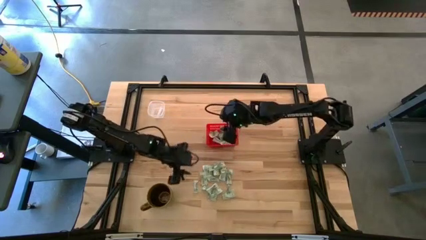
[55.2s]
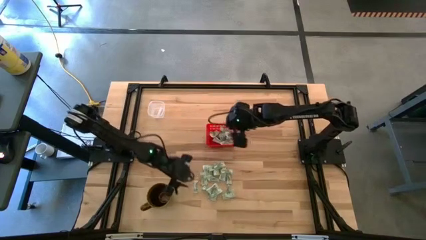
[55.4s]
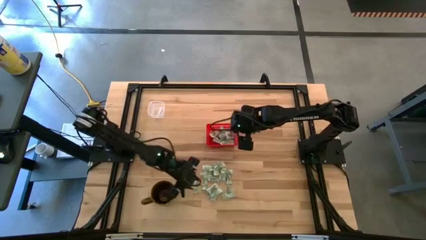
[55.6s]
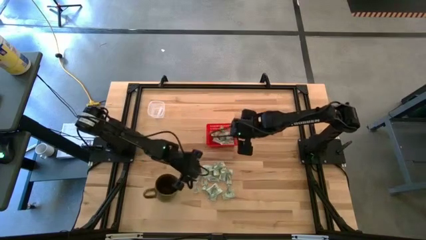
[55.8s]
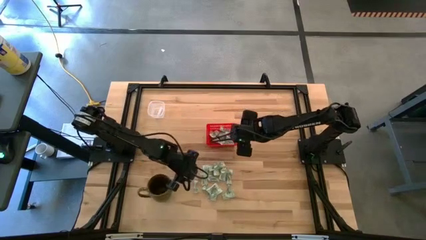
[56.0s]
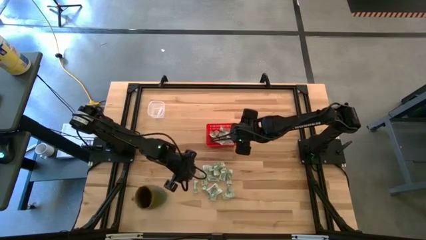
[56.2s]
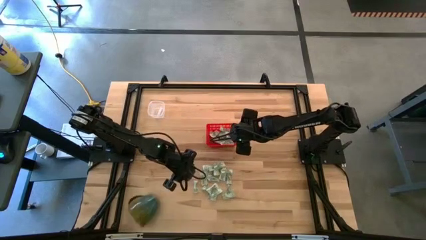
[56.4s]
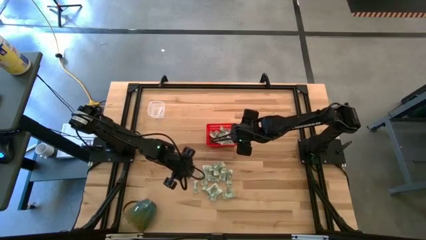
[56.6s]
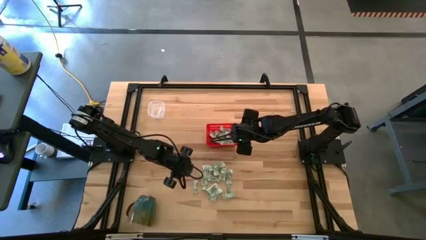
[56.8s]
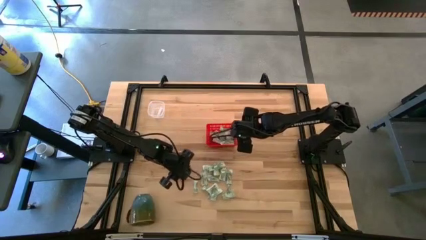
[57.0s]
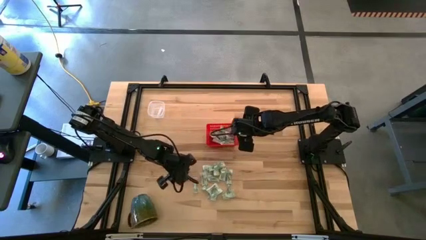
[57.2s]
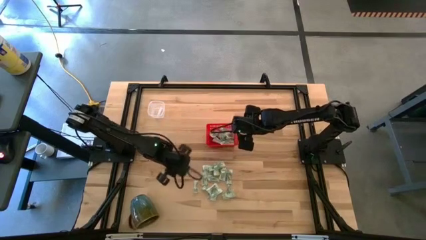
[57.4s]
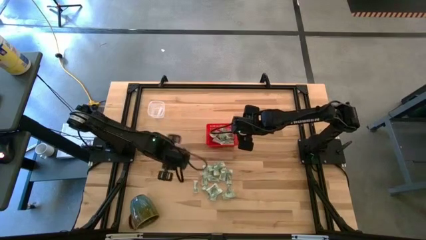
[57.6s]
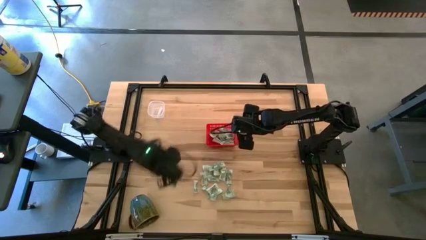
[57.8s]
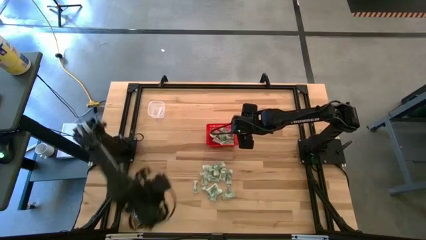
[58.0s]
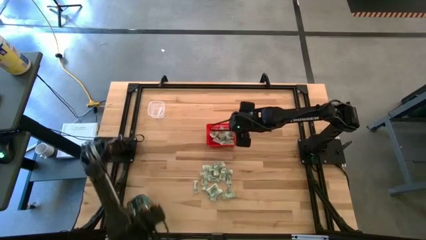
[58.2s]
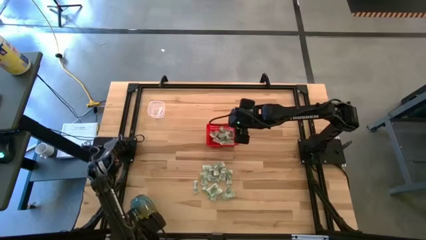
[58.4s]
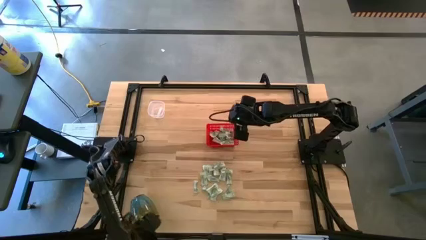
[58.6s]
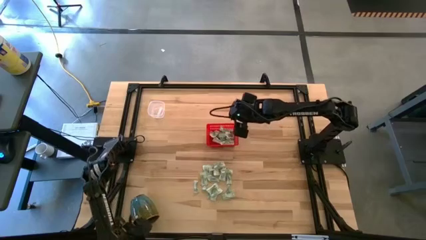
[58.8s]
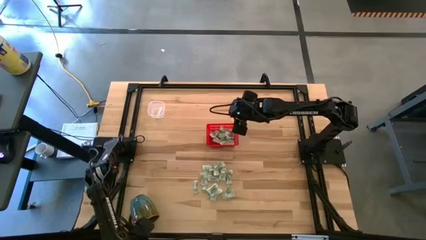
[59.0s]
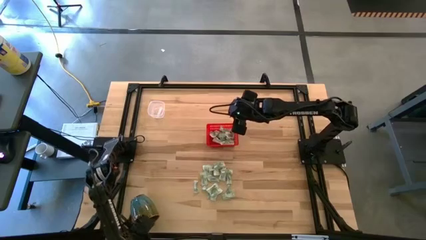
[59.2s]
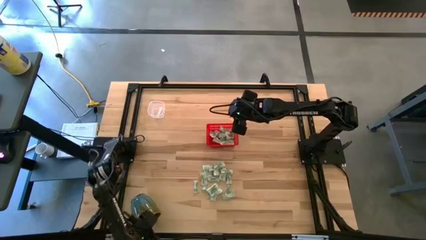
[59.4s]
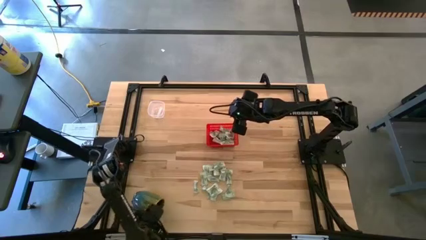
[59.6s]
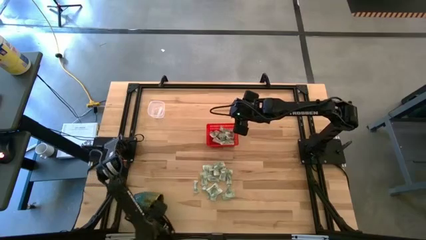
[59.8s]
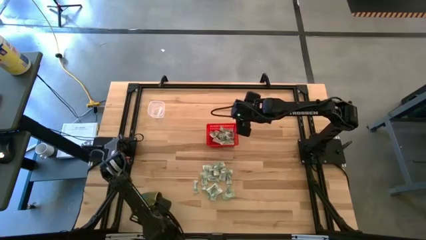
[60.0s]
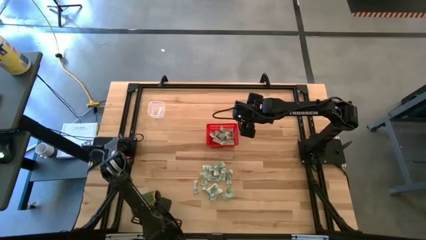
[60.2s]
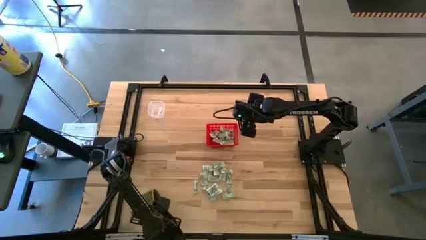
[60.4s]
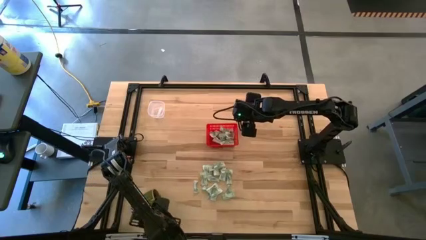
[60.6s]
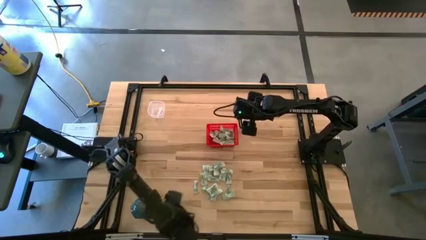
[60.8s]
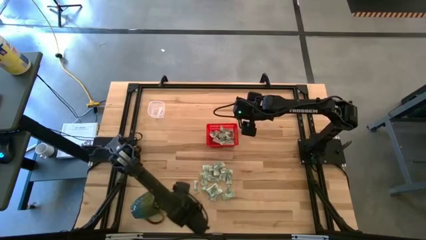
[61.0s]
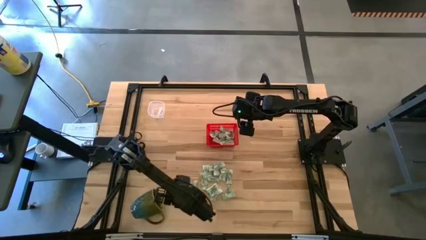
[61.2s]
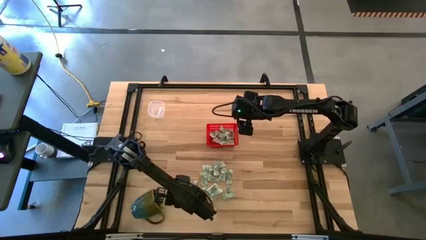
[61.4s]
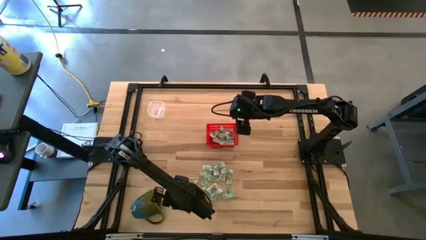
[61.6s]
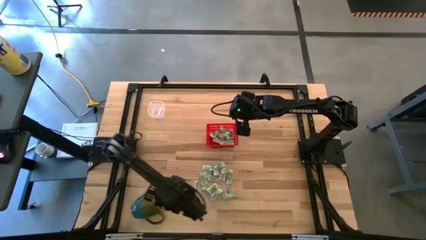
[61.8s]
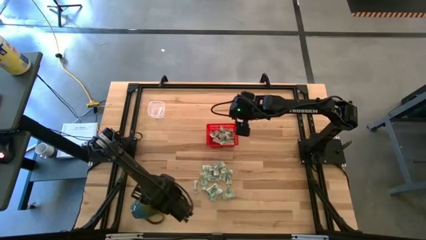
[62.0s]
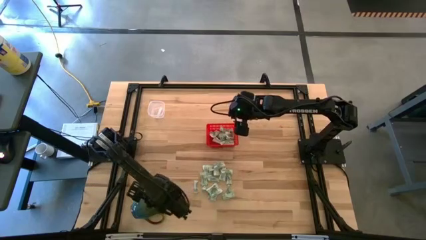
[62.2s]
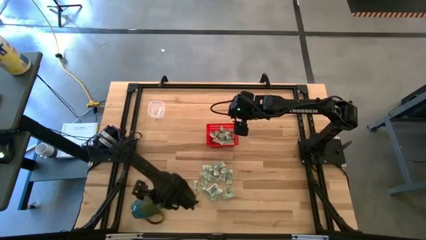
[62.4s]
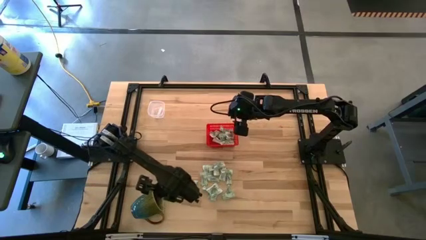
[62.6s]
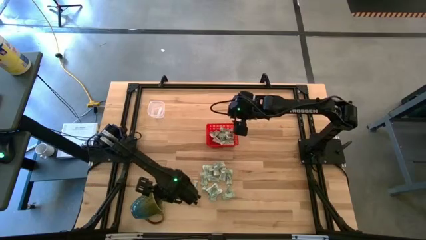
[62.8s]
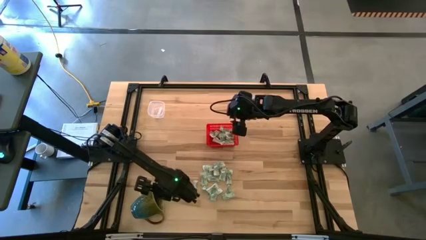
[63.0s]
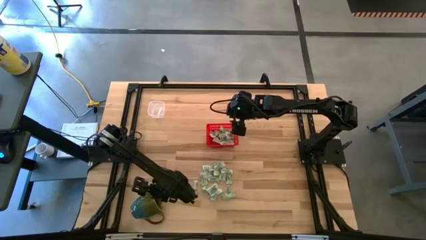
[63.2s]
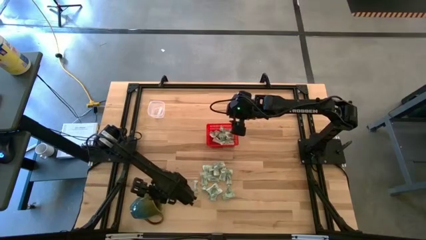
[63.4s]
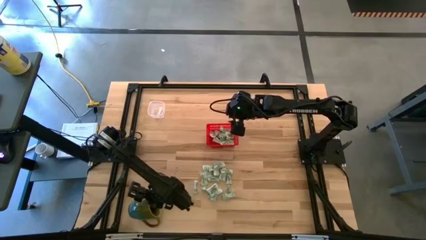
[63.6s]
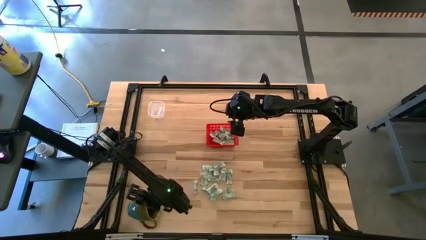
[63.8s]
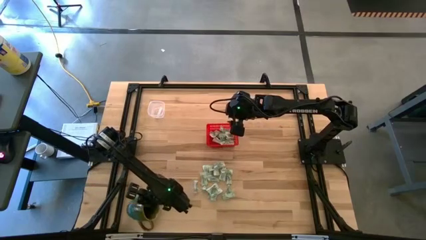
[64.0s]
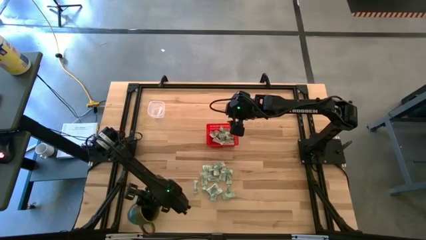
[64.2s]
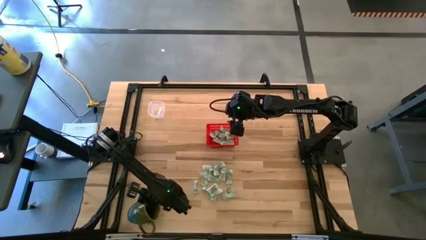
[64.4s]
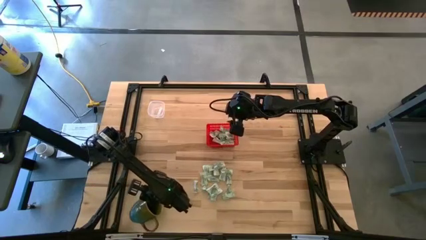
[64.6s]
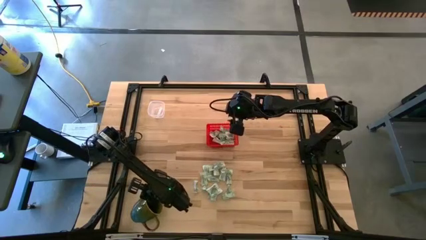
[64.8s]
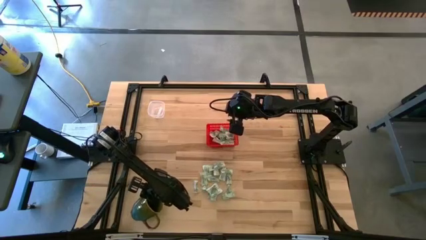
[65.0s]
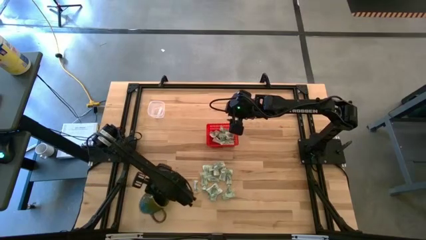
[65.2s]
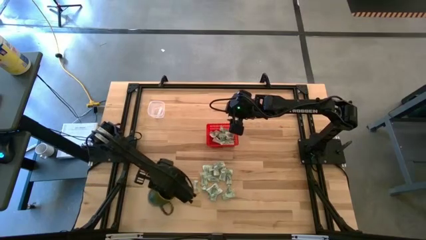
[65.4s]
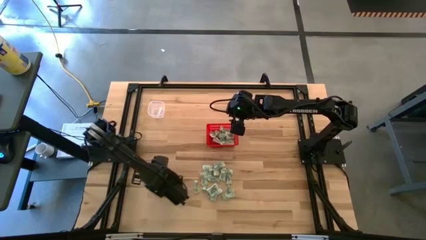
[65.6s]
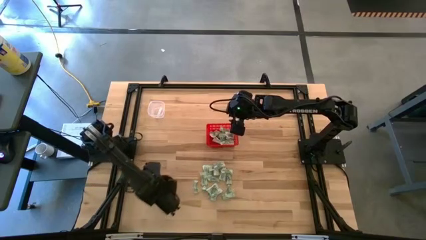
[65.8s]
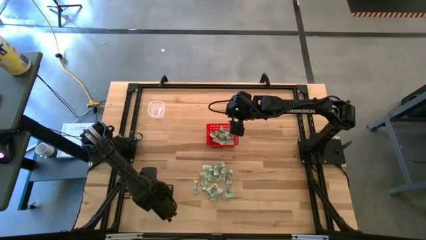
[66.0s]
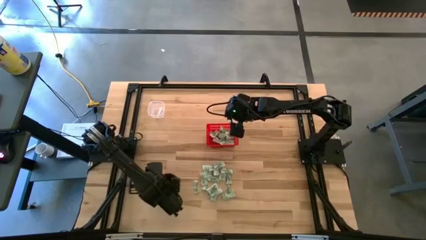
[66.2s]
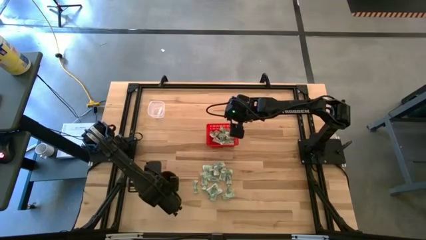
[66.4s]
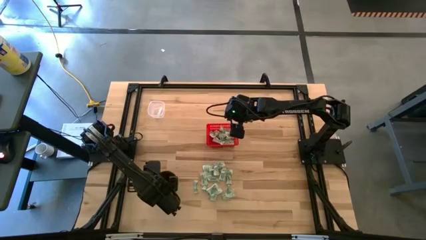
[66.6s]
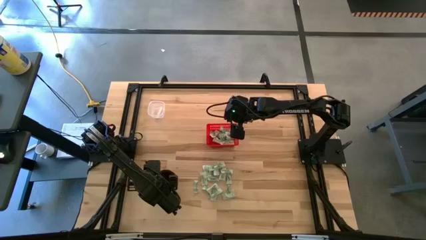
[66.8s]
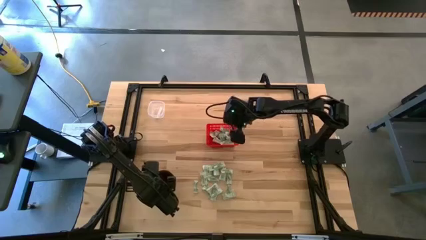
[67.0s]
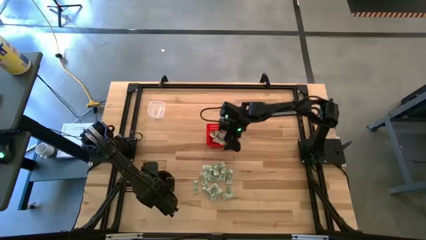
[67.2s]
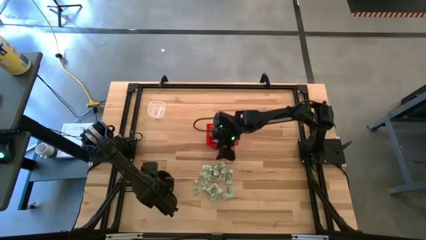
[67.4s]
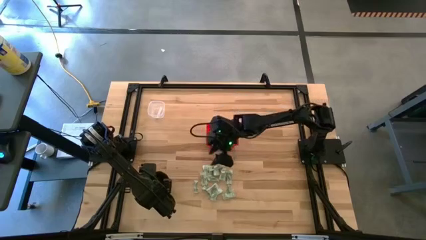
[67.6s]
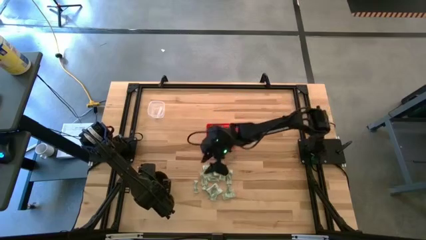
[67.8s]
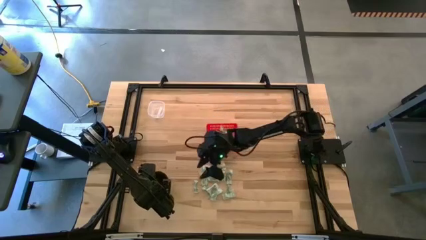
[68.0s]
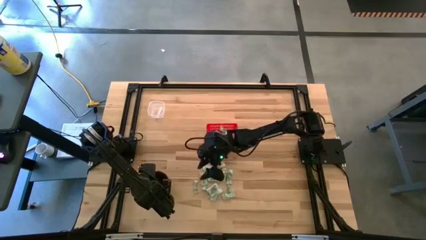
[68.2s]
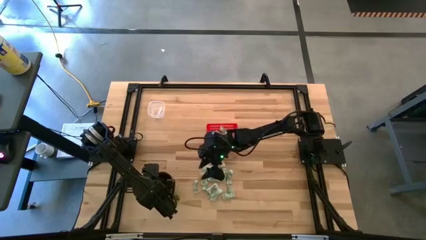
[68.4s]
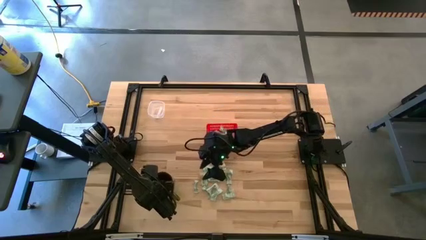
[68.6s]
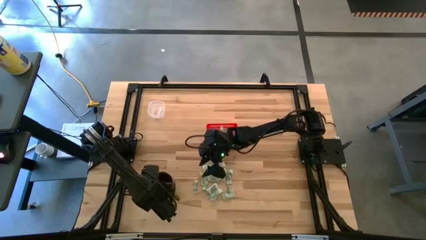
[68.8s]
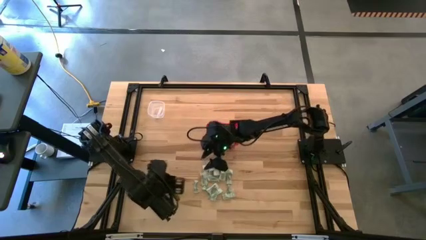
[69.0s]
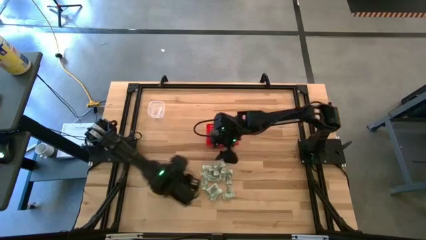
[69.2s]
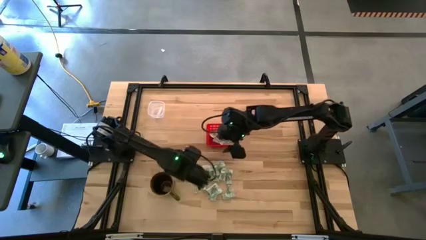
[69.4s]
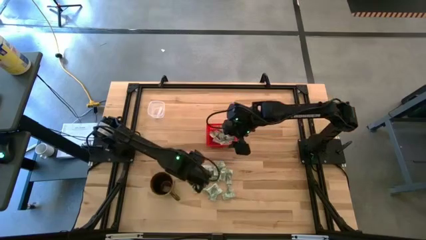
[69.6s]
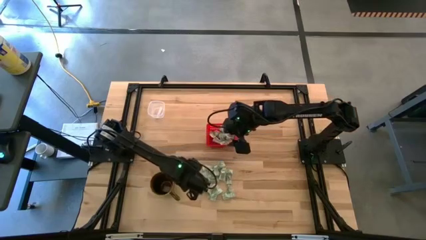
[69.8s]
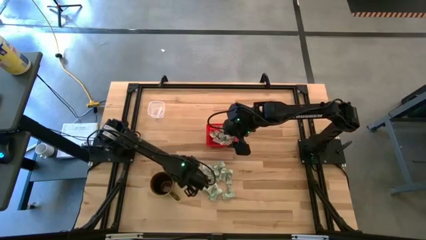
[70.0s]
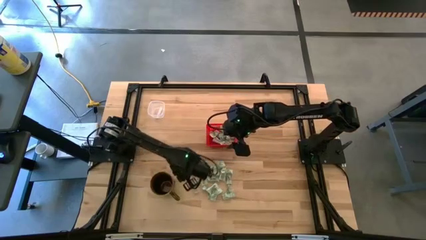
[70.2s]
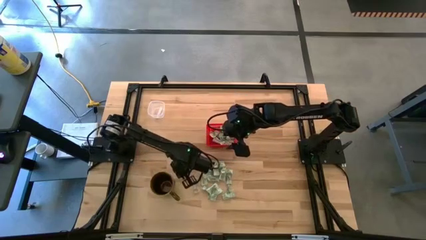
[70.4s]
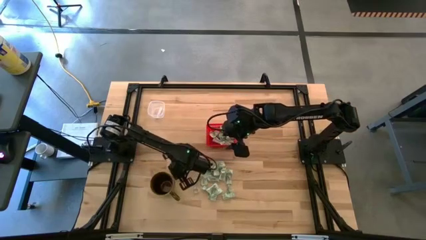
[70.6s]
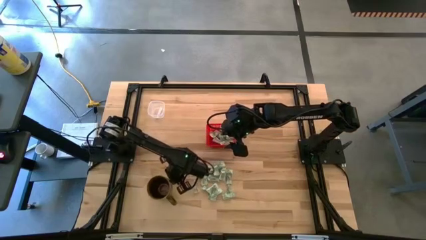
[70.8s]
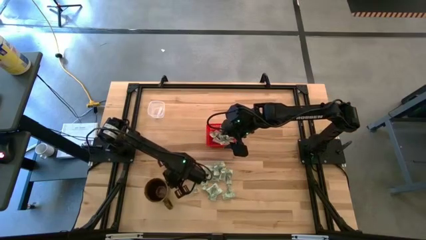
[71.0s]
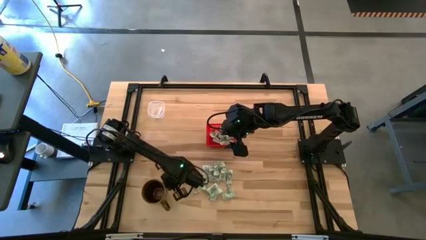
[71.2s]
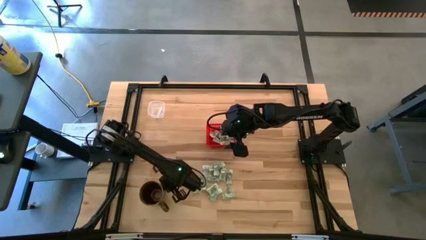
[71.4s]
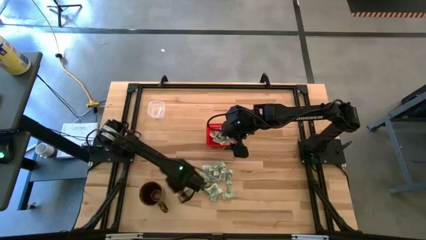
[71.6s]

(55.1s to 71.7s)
Task: Pick and place items into bin
Adjust the green mug

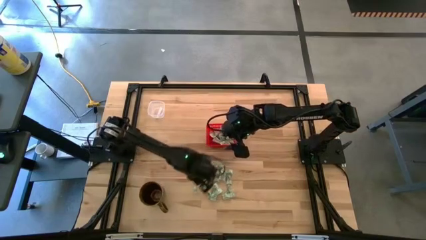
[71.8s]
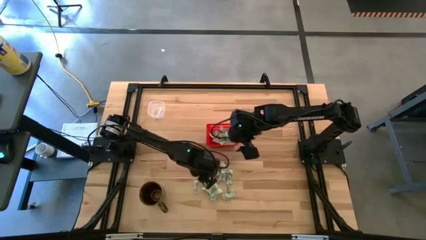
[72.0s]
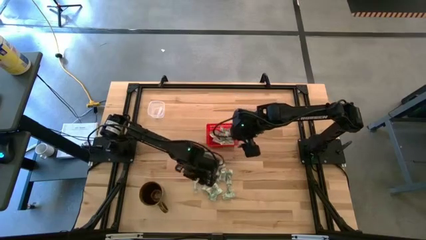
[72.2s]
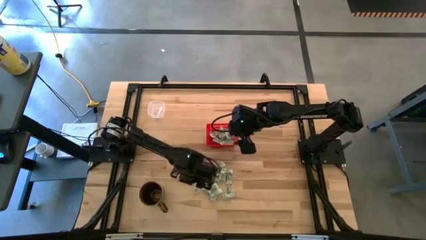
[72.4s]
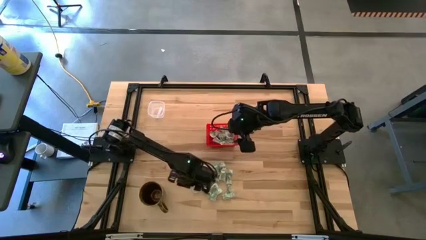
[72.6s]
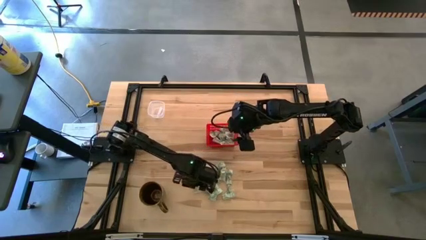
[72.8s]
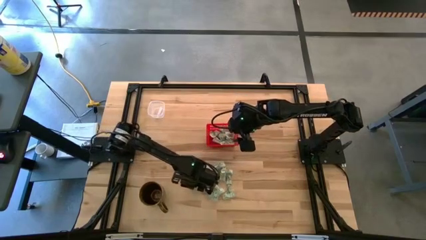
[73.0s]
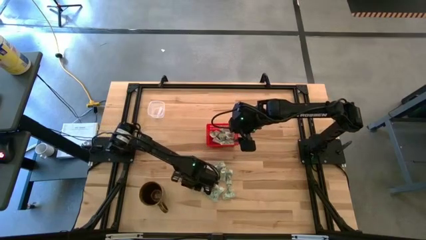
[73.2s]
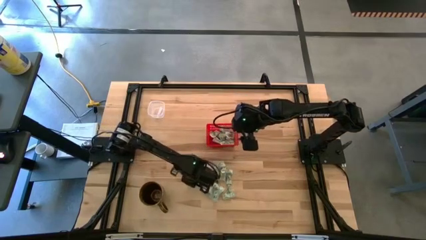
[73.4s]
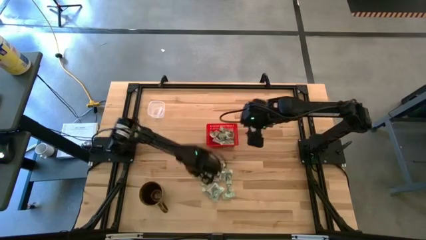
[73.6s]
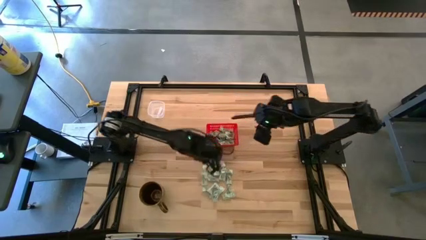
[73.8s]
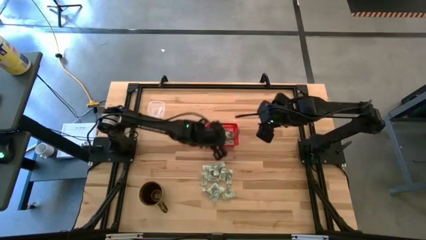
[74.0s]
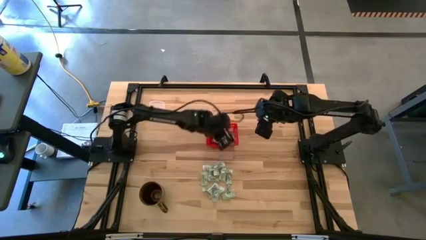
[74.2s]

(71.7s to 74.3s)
Put the green stevia packet into the red bin
